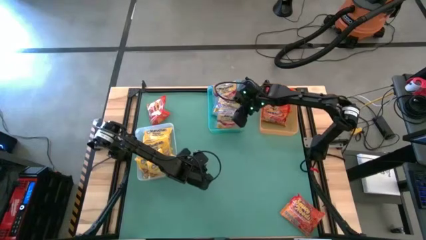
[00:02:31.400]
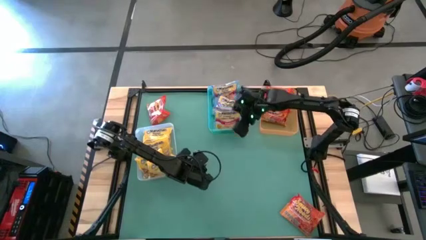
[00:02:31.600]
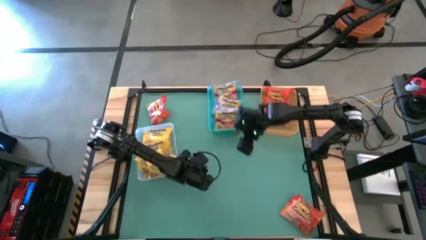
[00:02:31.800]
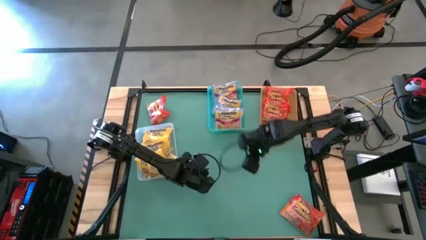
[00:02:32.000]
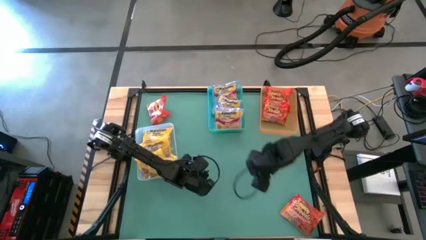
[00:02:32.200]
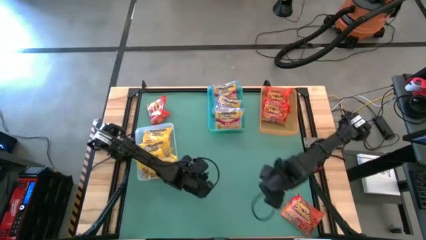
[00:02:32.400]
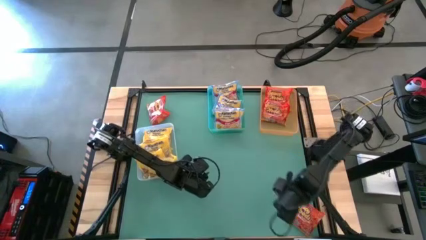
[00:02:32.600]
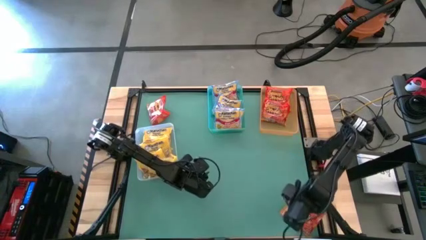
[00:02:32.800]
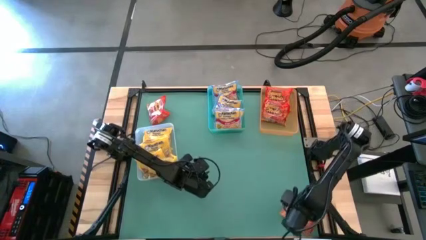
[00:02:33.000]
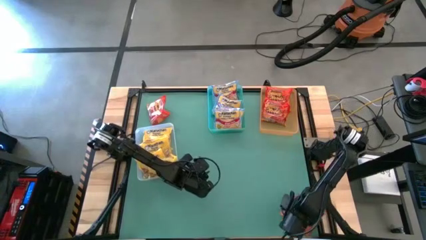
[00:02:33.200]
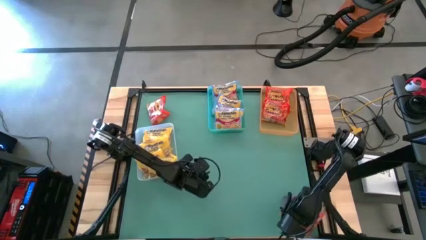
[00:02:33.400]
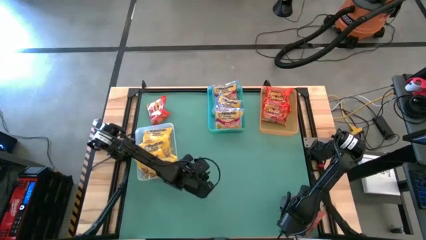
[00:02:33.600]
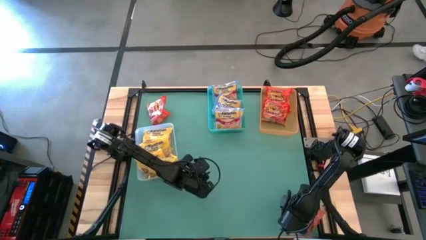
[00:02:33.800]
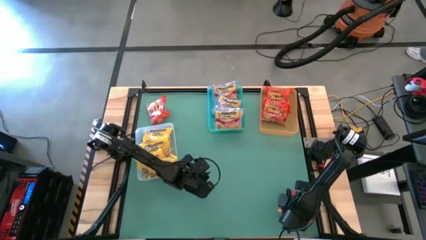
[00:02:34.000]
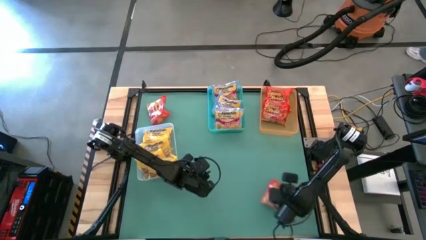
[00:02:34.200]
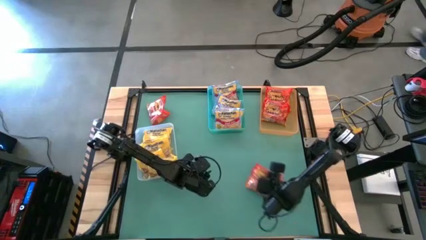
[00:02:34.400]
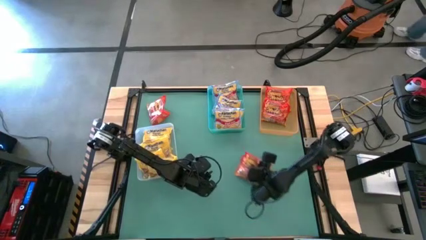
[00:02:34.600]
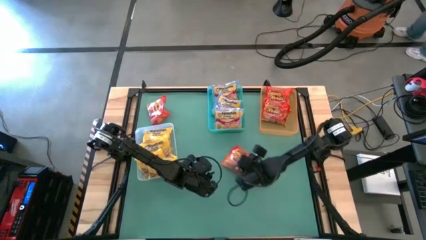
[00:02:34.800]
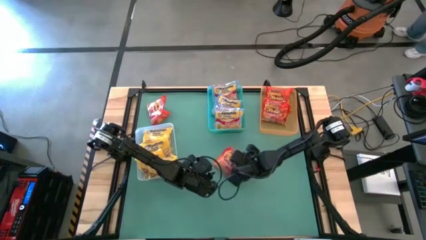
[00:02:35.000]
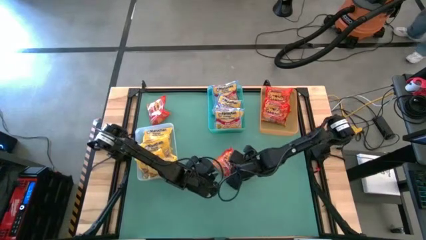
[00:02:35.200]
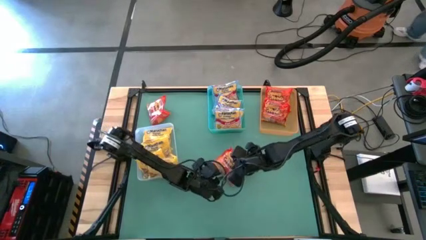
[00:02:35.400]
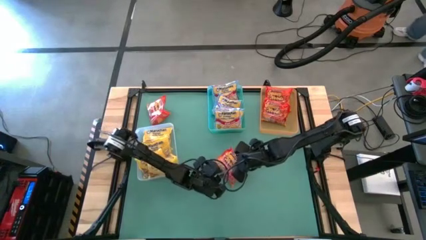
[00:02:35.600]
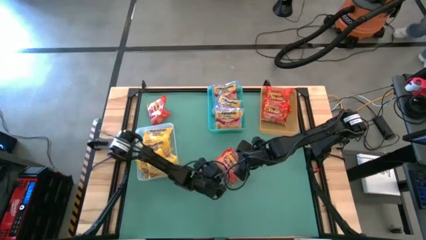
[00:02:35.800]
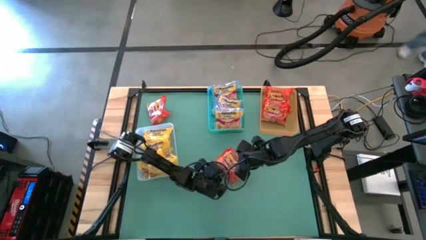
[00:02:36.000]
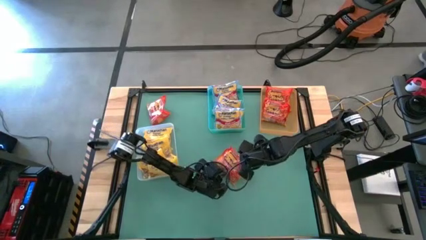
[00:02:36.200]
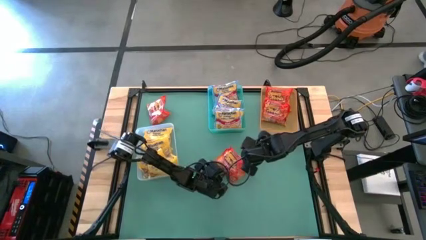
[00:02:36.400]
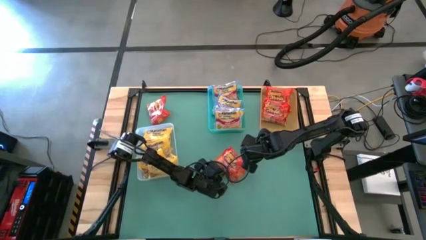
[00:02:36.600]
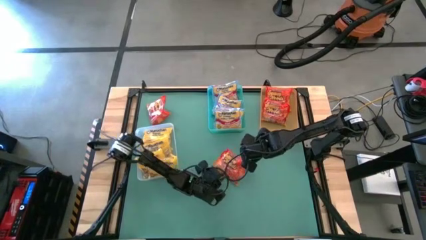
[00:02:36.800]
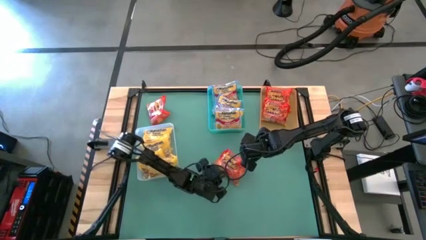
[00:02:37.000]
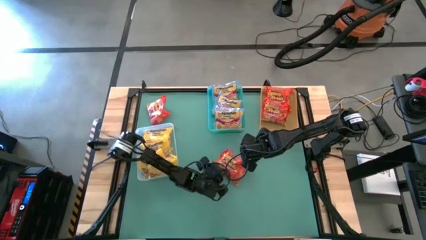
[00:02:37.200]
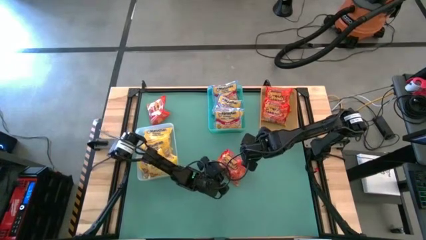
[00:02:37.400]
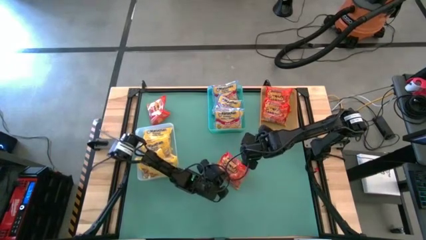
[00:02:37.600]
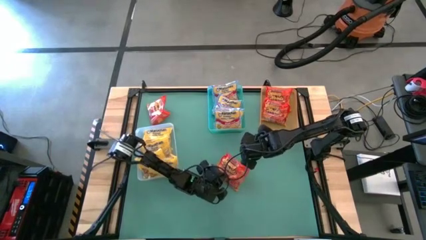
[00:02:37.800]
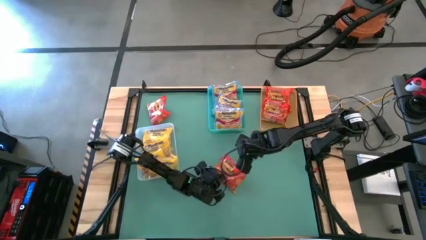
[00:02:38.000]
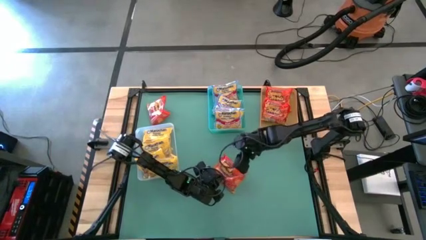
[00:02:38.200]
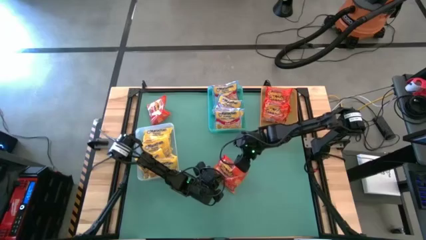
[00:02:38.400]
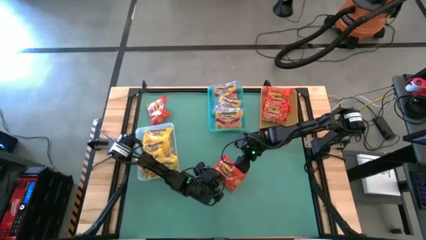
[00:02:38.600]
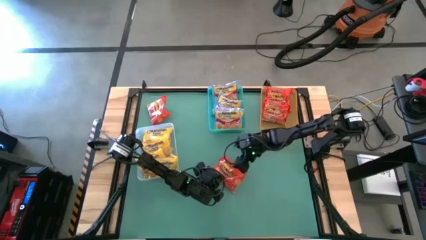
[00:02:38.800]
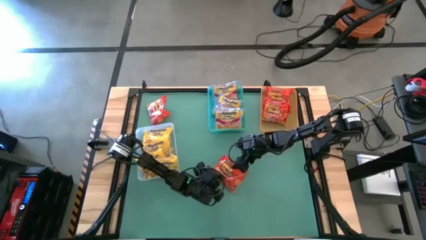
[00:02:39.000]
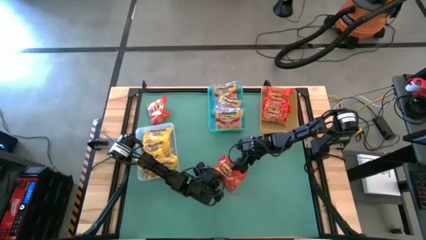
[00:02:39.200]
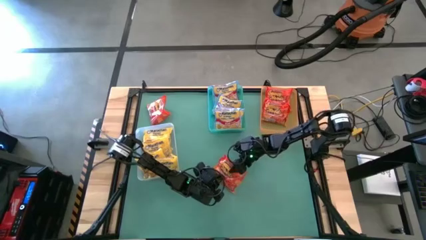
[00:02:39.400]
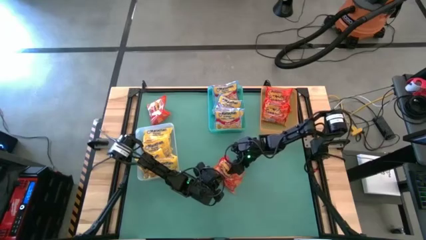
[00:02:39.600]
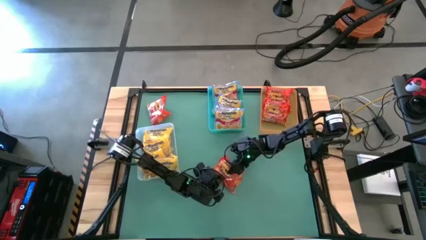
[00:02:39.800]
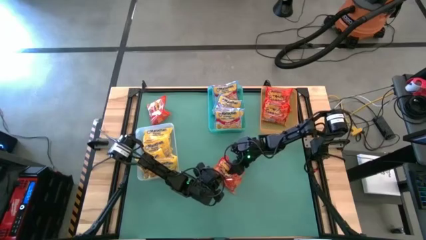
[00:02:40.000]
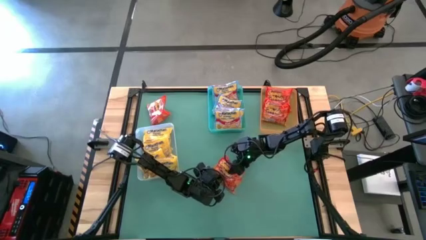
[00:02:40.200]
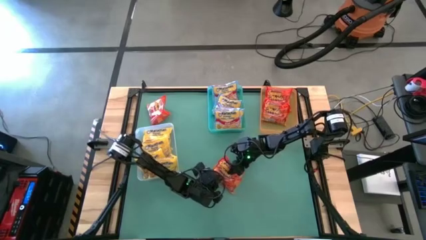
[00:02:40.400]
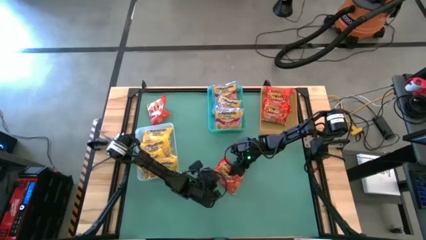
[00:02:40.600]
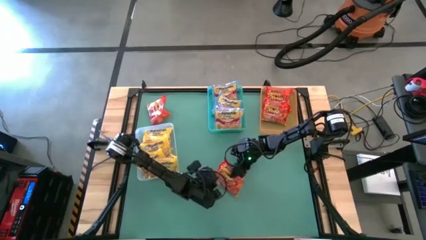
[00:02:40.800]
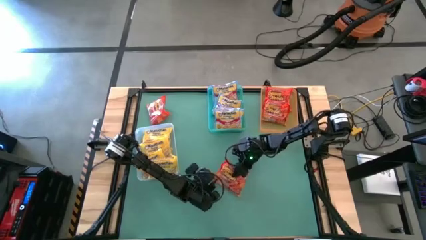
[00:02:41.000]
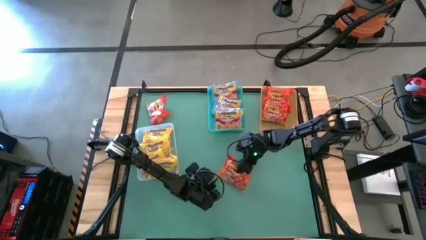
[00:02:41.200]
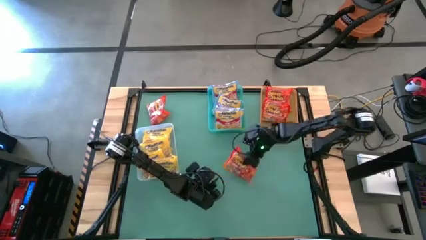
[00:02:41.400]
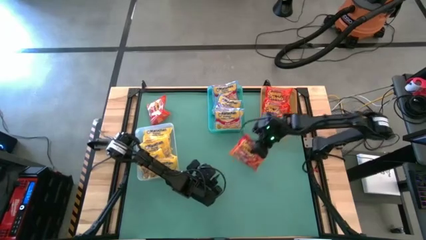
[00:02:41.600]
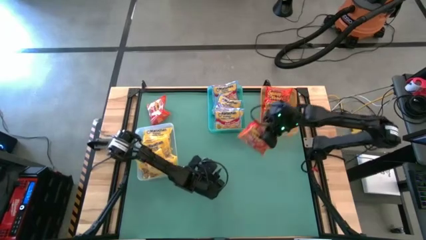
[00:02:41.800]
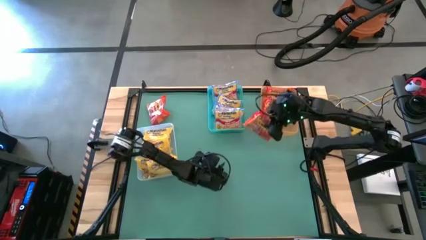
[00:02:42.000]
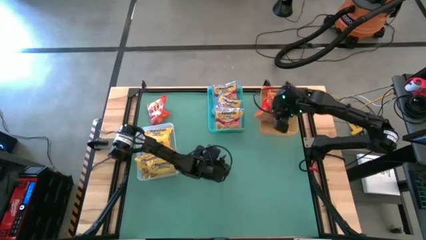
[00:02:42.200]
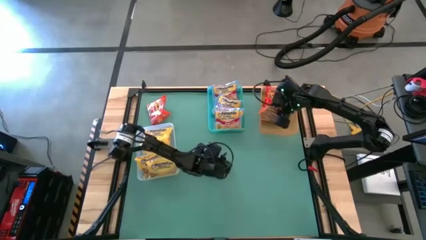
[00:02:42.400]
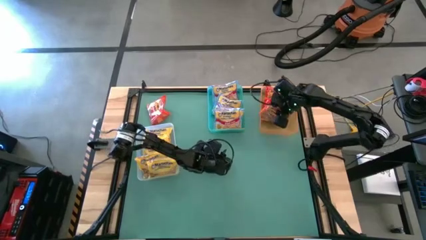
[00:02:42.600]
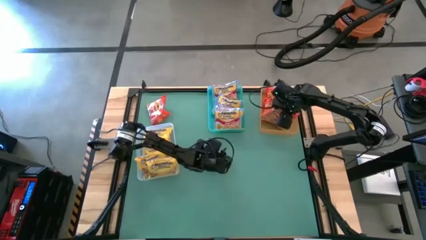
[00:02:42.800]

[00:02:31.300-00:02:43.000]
Task: Sort Maruchan noodles
Put the bottom orange noodle pack into the orange bin

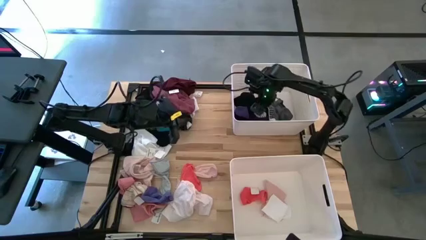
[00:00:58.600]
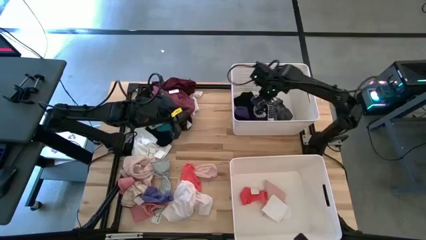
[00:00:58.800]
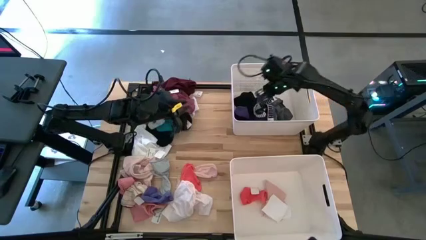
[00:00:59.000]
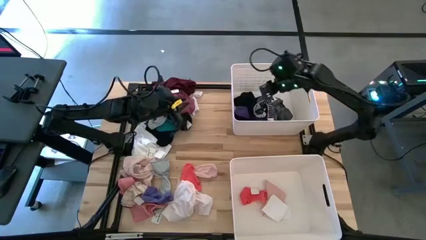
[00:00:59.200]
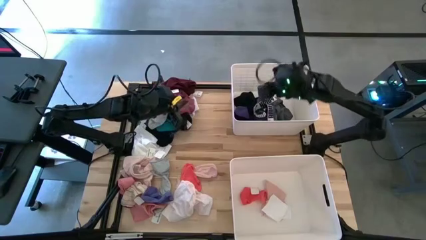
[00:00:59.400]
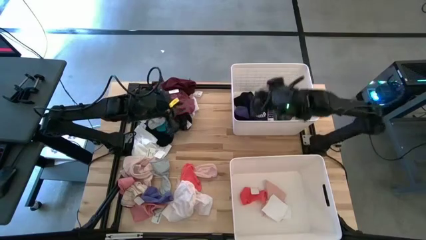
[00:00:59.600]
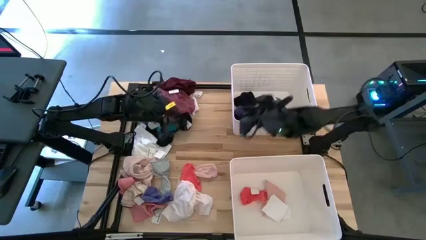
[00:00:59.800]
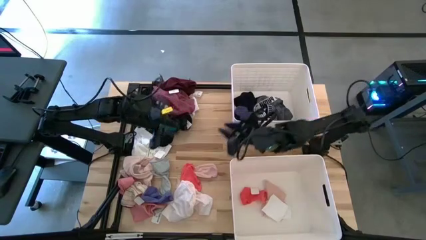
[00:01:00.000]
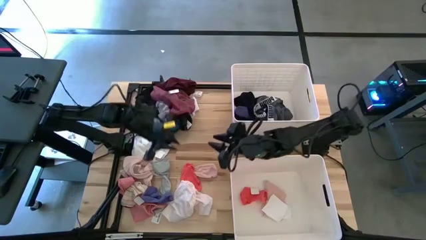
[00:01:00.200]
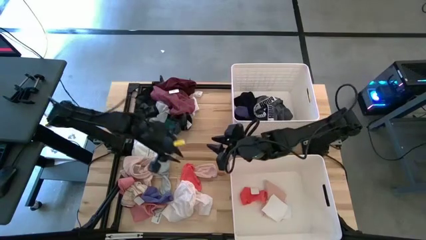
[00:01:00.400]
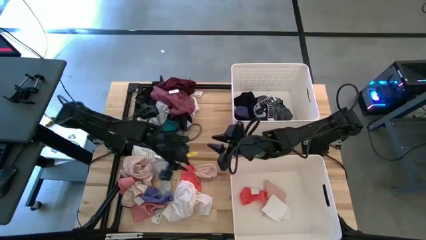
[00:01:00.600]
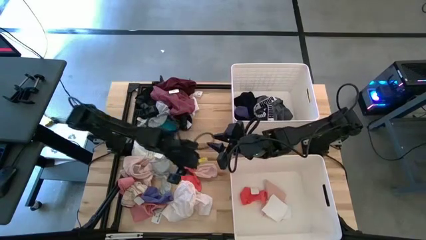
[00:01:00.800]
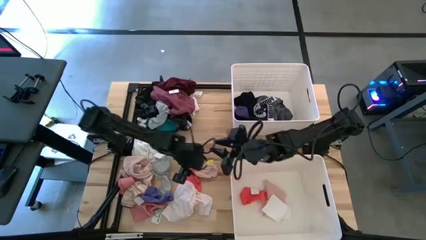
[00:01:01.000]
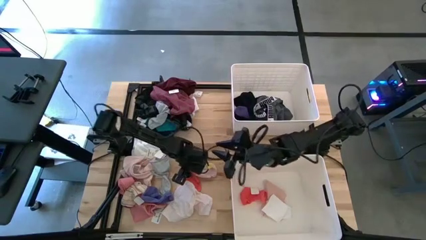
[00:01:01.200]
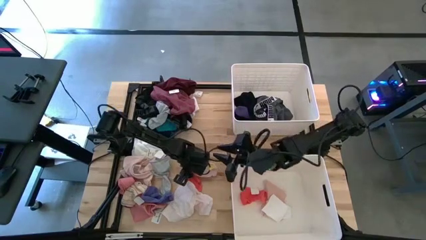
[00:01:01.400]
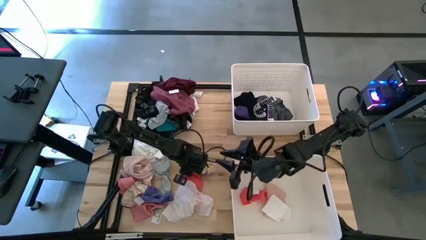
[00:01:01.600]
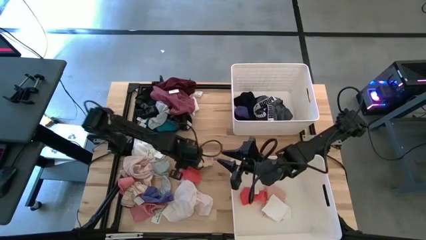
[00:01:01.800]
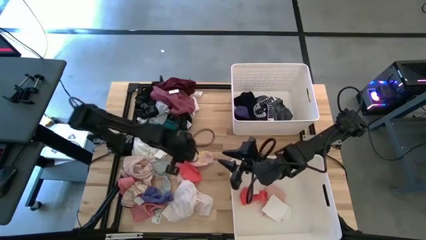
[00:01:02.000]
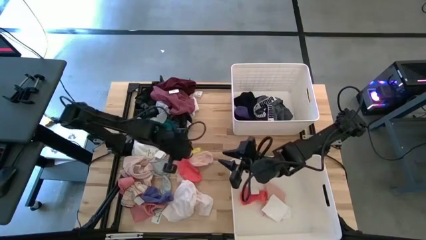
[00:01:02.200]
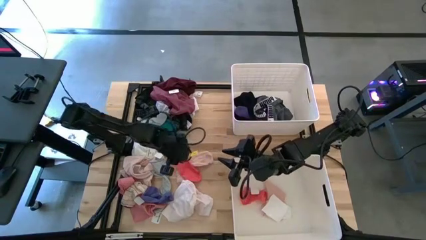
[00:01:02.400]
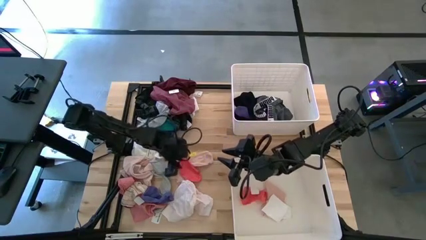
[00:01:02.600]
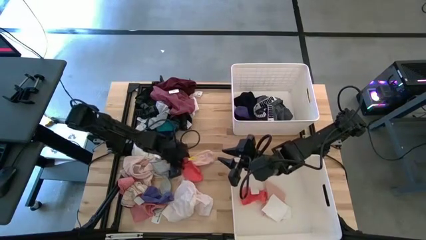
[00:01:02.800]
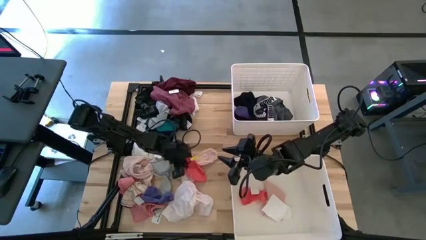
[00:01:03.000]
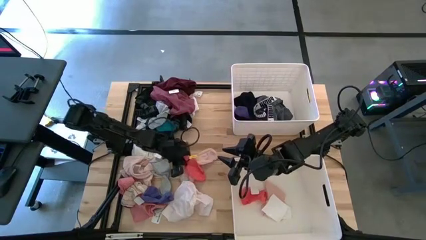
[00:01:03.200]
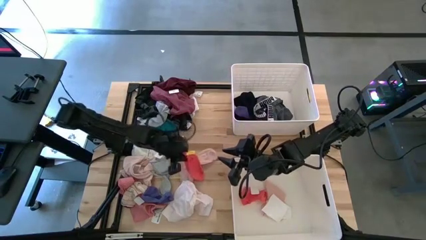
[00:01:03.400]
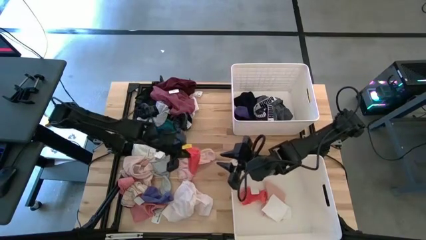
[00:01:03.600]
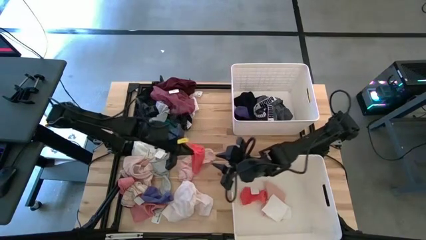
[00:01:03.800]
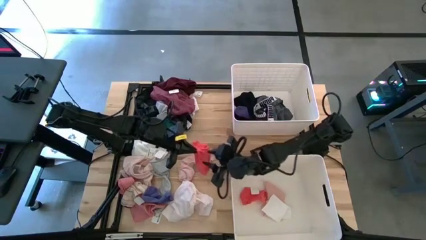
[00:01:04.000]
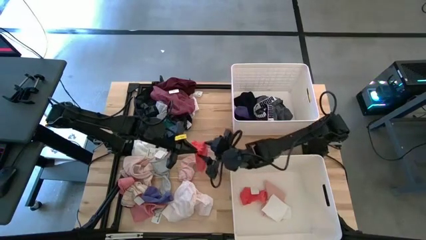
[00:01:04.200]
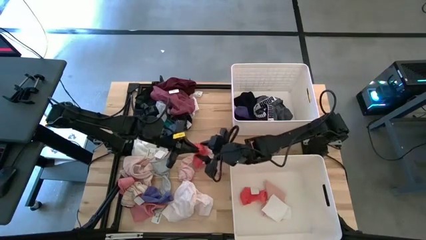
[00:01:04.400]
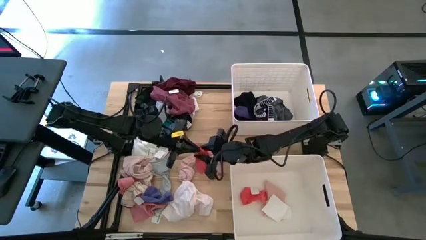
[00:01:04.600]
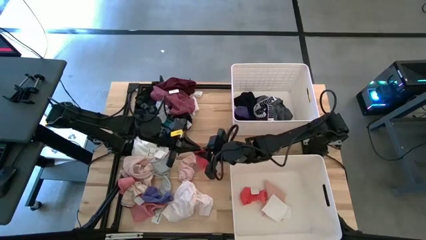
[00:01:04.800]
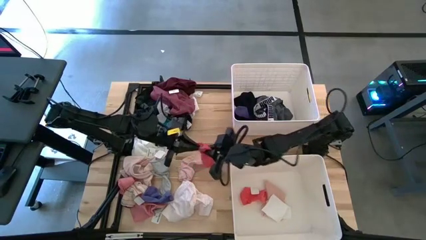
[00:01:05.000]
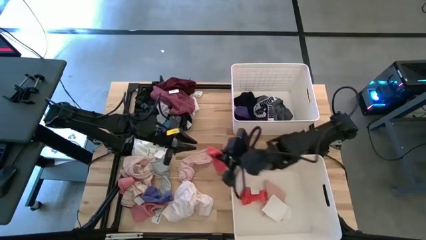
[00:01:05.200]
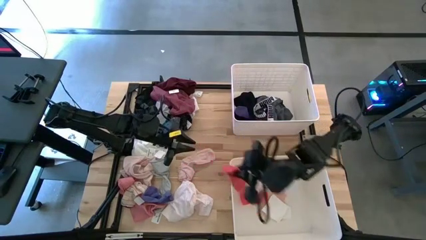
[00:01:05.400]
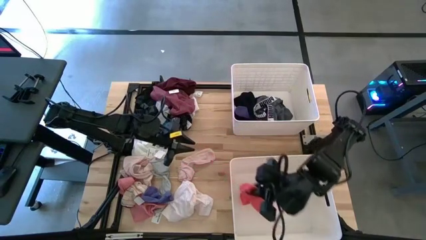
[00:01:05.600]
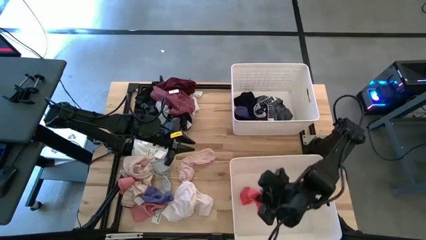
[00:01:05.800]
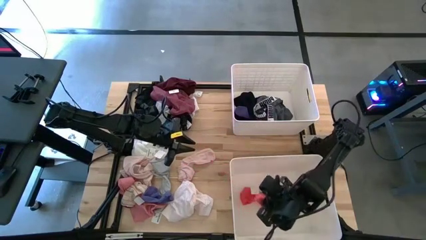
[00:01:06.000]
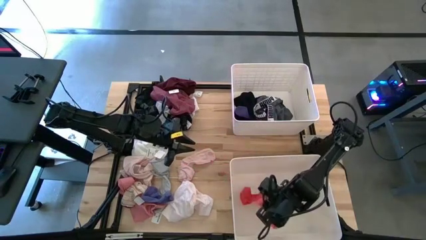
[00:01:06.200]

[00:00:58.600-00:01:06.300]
Task: Sort clothes
Put the orange sock into the bottom bin
